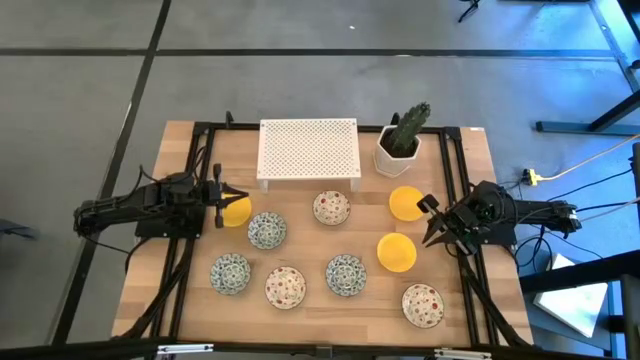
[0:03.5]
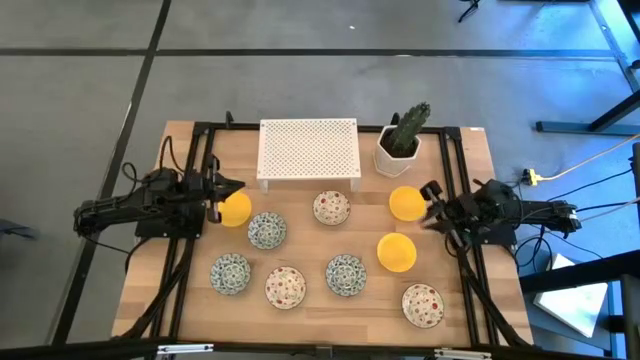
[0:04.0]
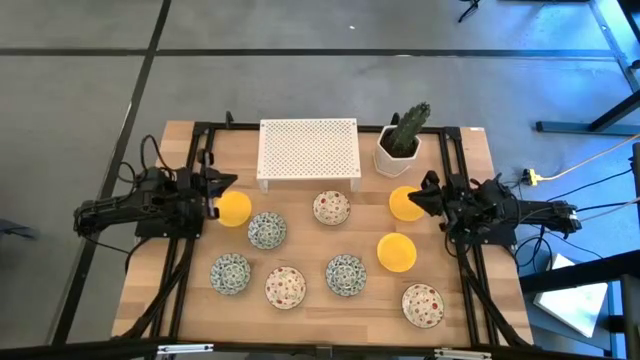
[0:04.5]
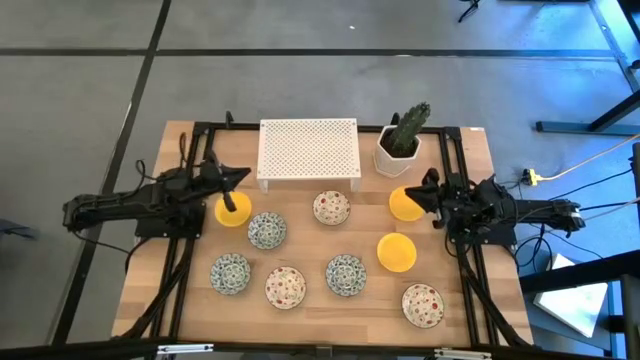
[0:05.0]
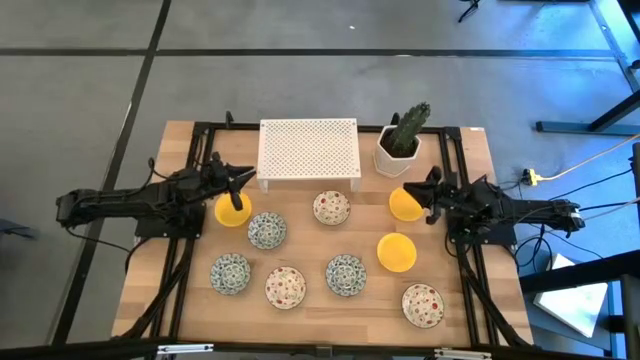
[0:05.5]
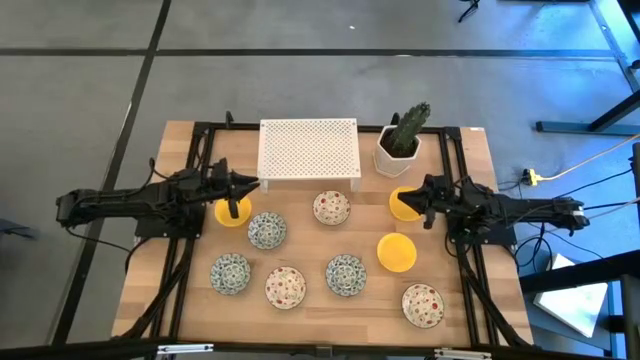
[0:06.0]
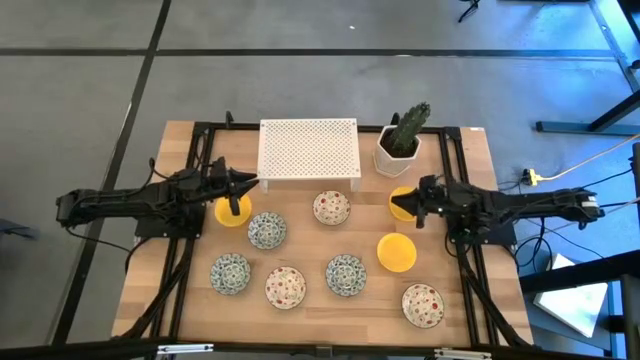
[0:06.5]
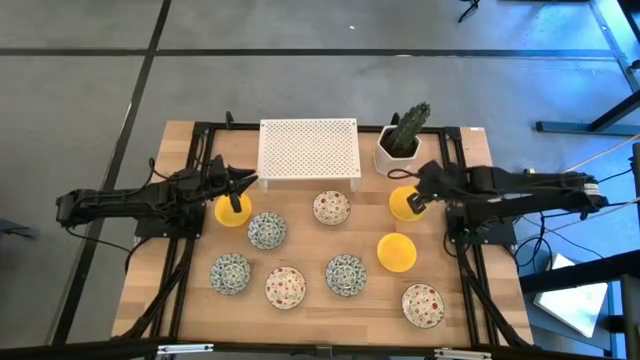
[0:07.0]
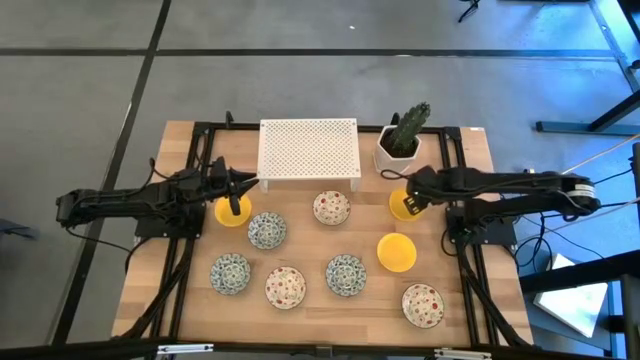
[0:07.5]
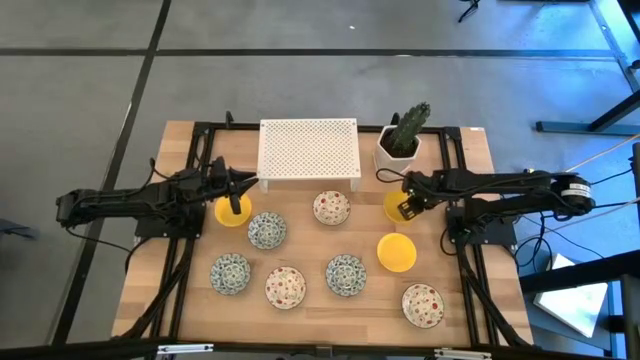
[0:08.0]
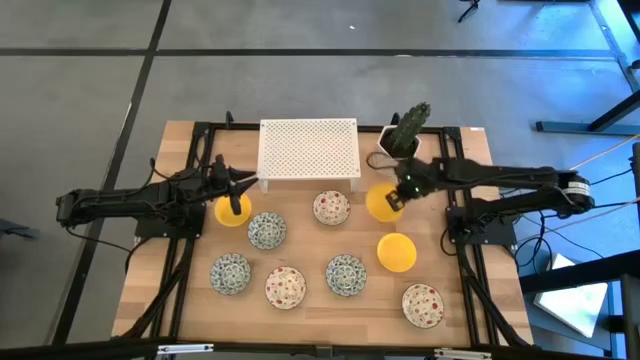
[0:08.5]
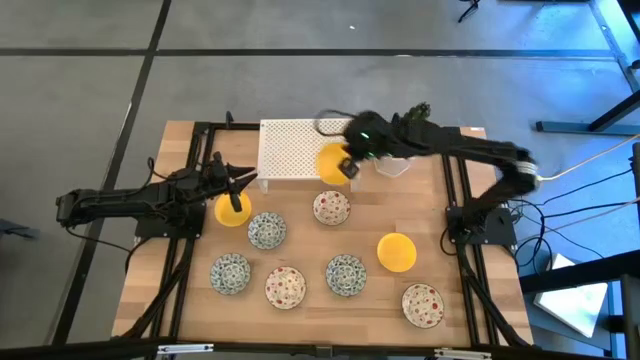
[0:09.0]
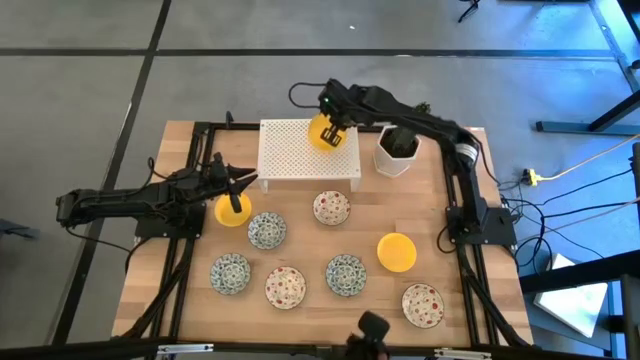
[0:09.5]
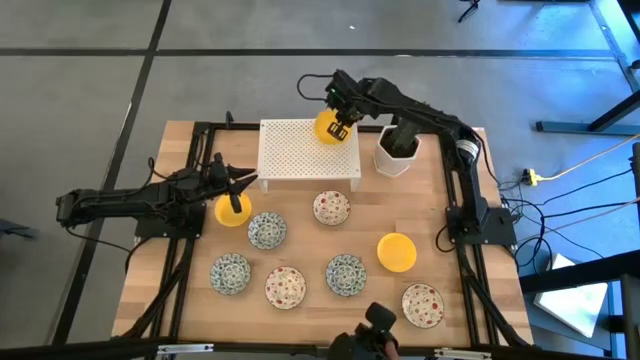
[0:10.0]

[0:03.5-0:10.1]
Task: Pick & Place Mini bowls
Put the top right yellow bowl on the shelf

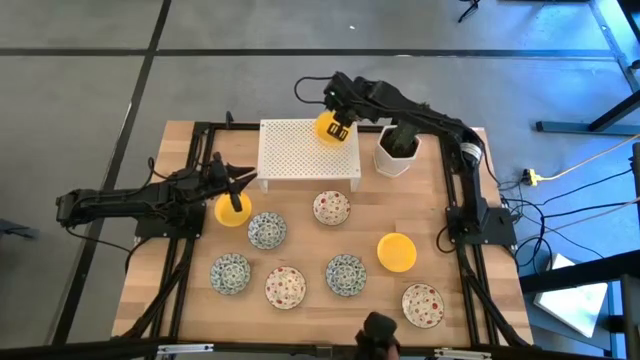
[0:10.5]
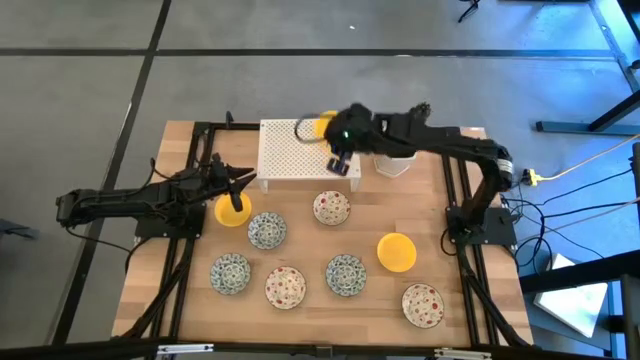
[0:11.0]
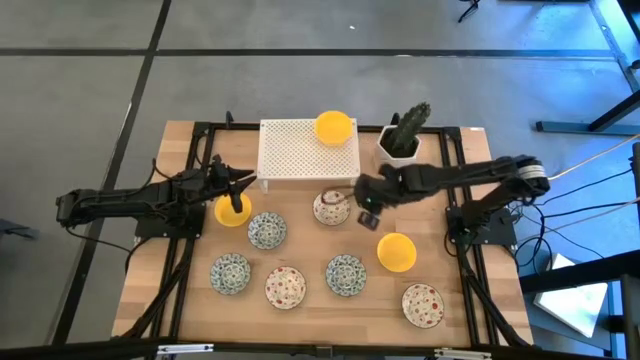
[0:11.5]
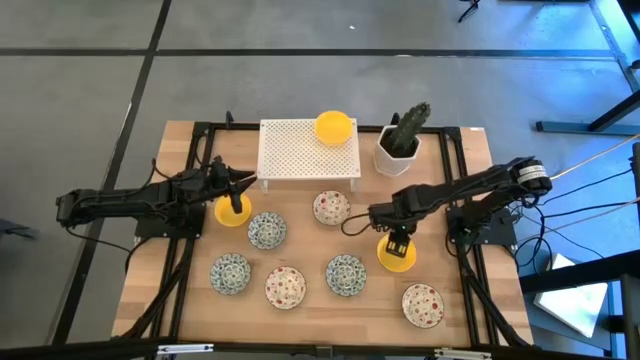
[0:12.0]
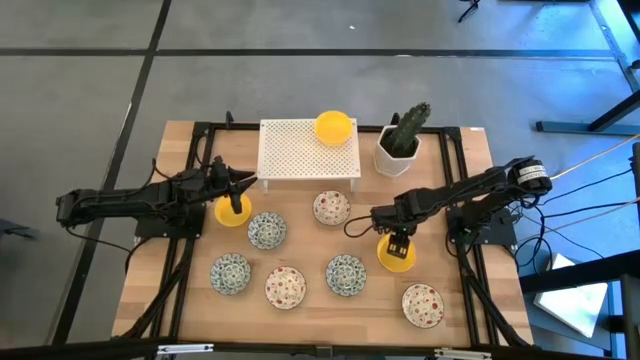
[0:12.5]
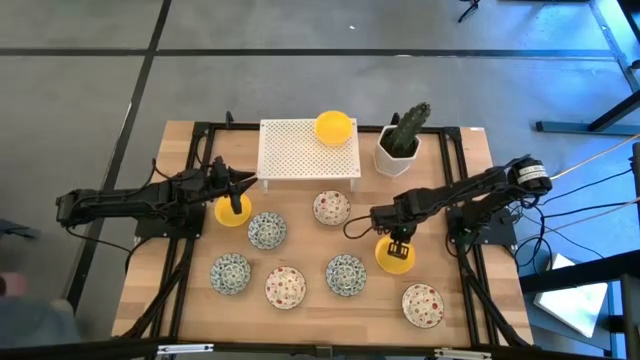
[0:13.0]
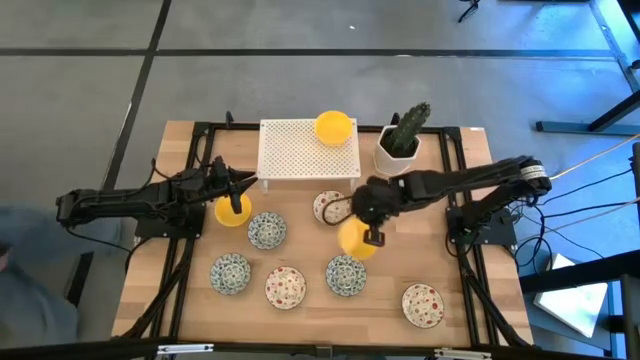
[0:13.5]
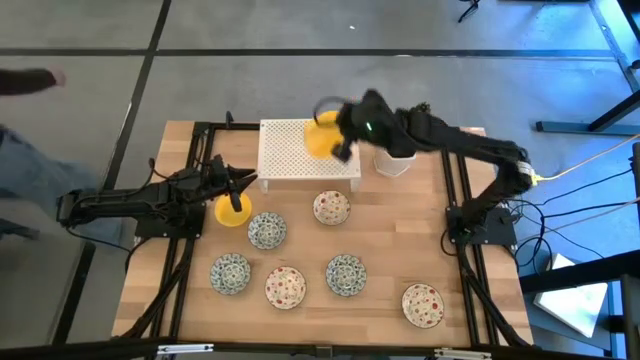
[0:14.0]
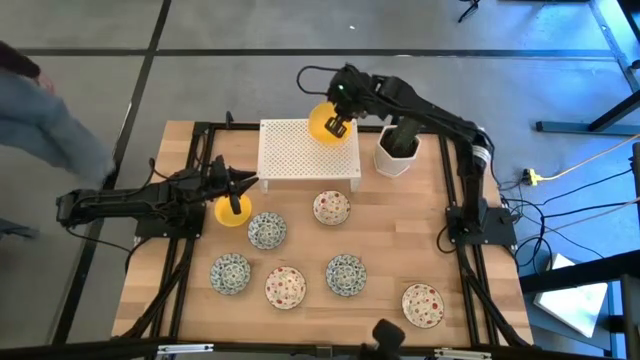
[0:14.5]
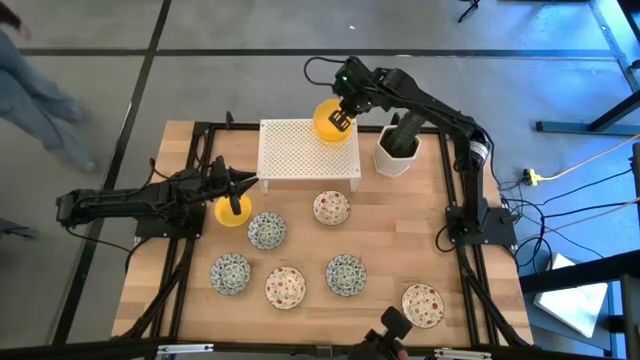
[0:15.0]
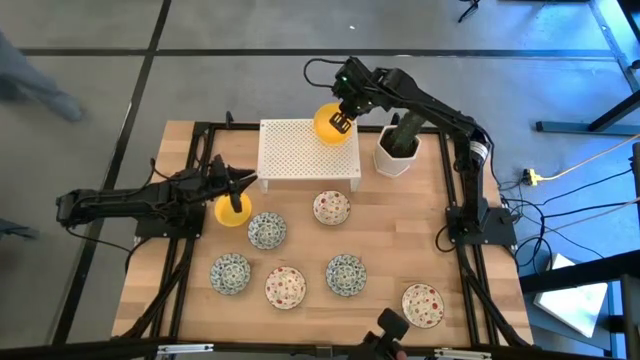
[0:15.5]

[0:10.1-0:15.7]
Stack the right yellow bowl on top of the yellow bowl on the shelf

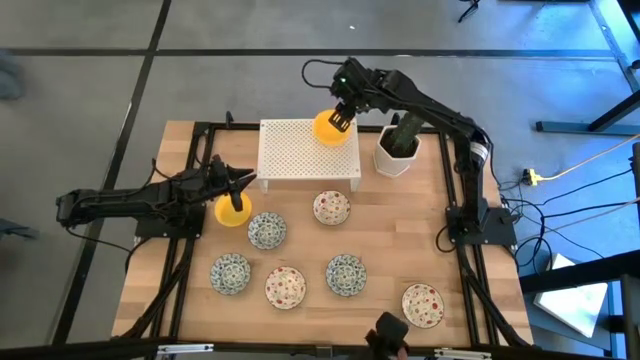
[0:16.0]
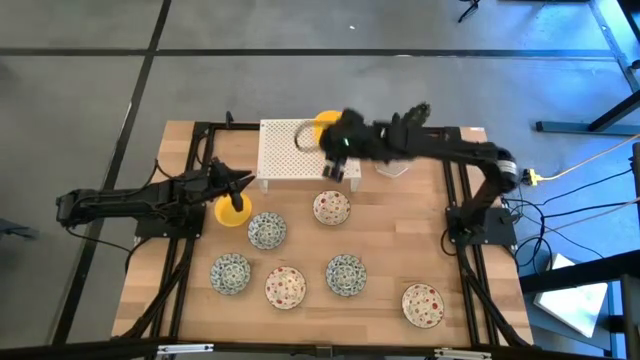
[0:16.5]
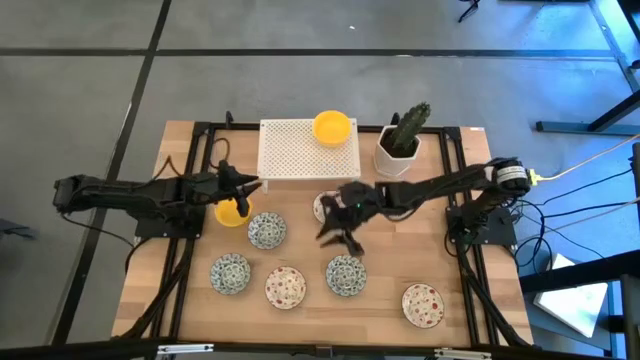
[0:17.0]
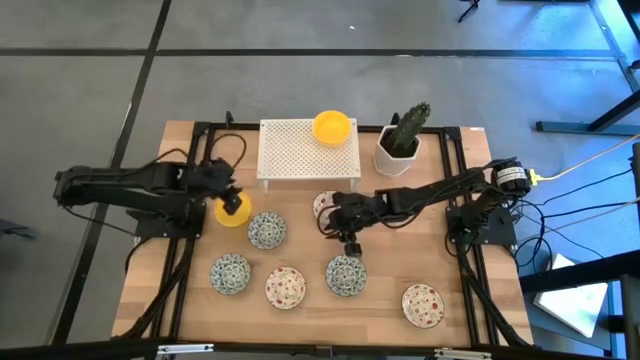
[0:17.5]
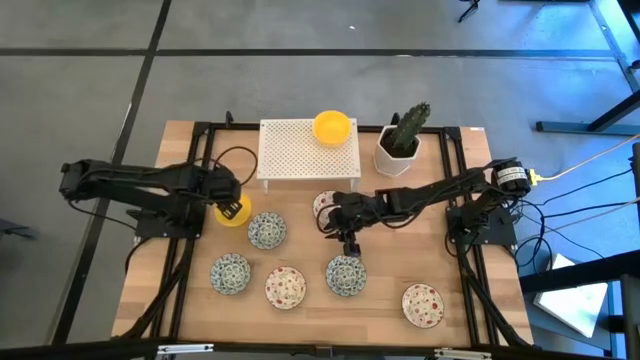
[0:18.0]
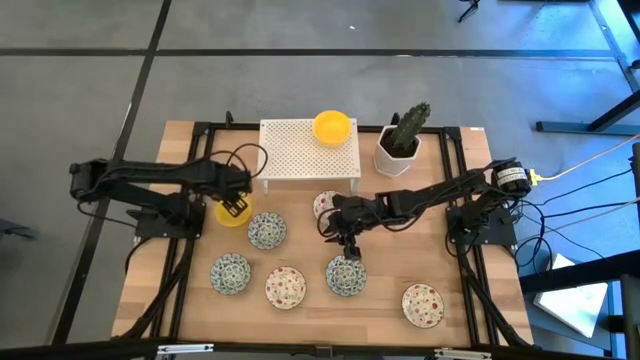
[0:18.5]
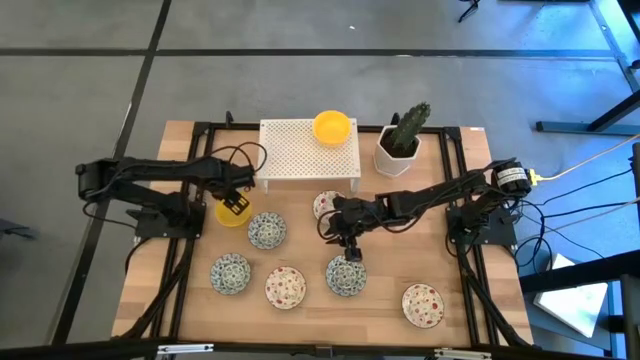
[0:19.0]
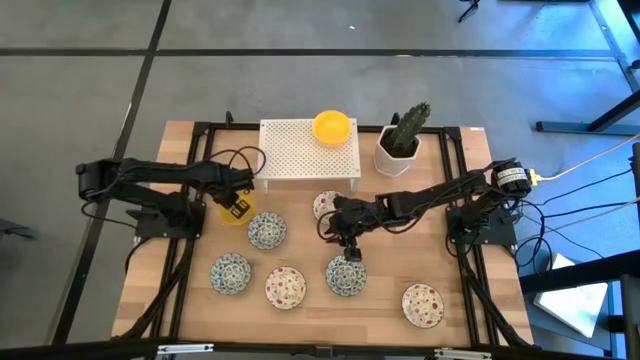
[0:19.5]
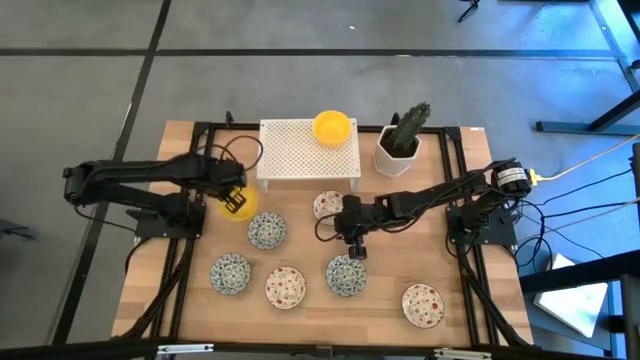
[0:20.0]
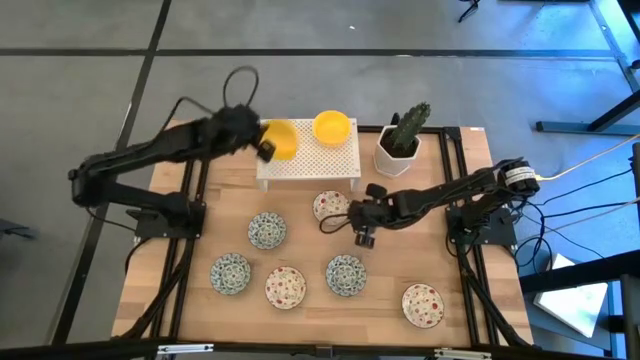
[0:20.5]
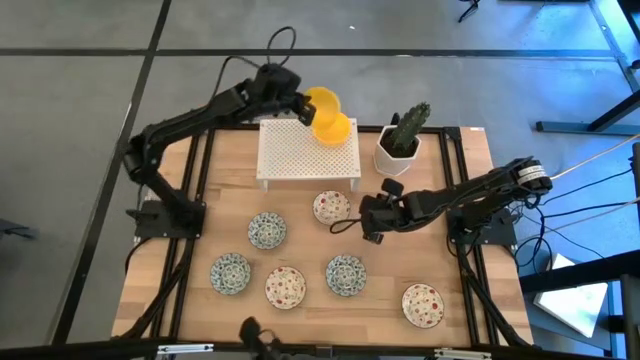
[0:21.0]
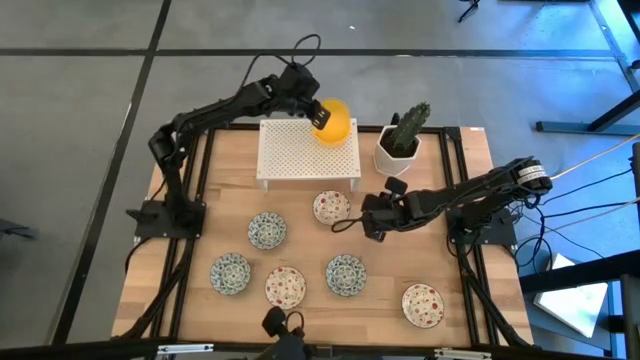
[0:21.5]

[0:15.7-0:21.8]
Stack the yellow bowl on top of the yellow bowl on the shelf

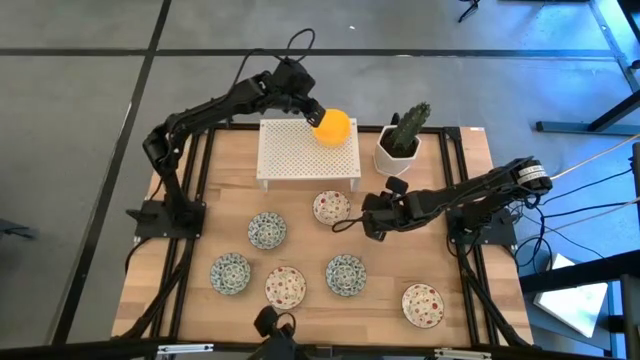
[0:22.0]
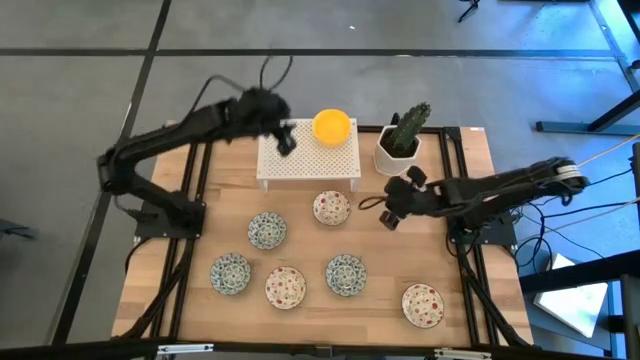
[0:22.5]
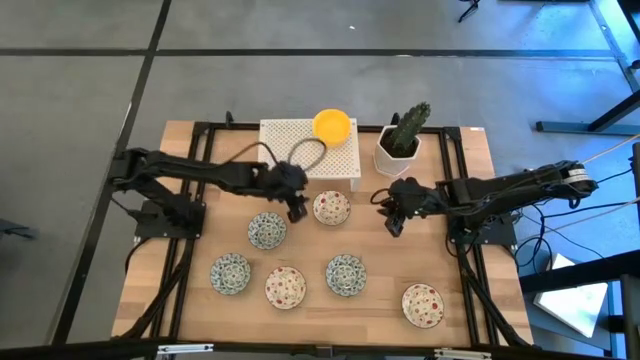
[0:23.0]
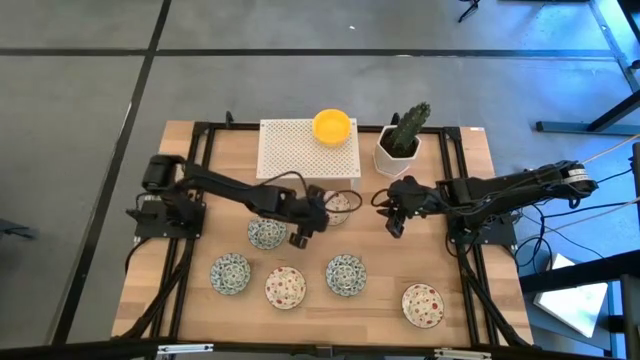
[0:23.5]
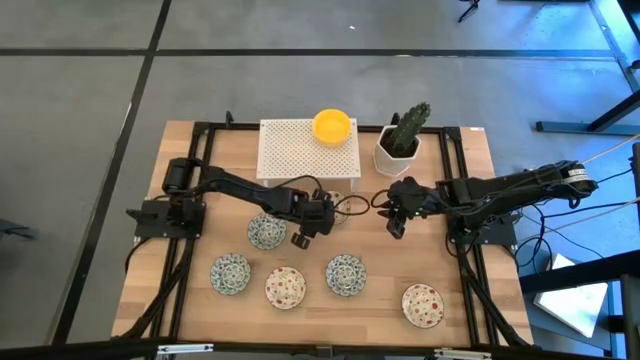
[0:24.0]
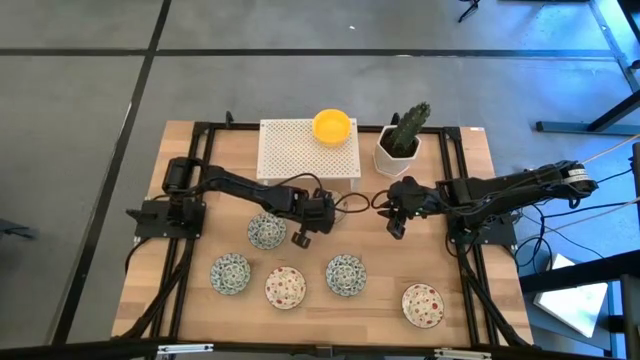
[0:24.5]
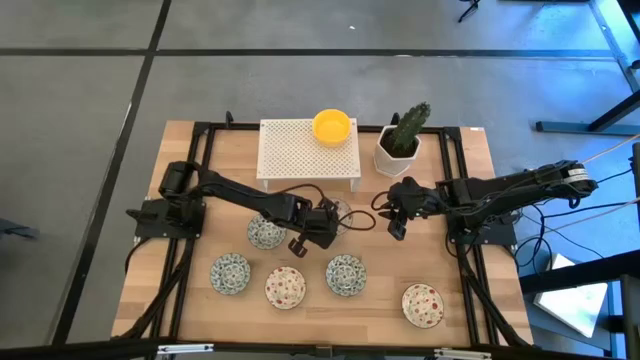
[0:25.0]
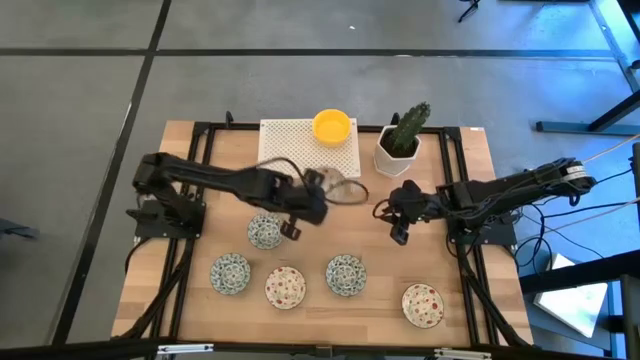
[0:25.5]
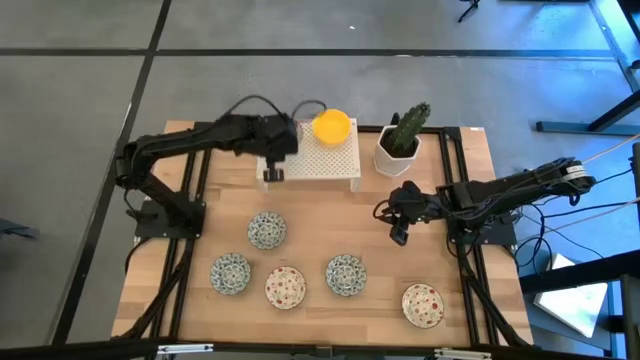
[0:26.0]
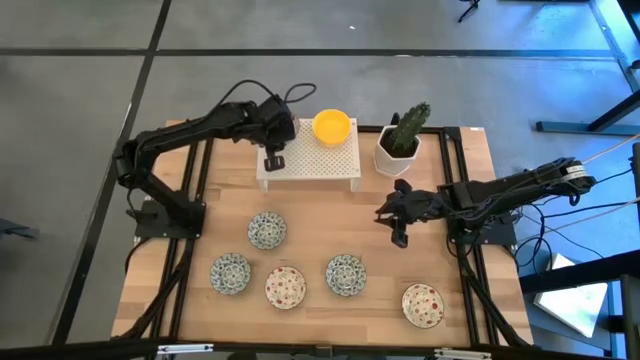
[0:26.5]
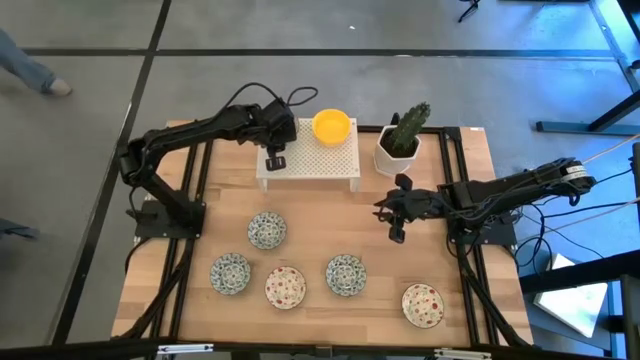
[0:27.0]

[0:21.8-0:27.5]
Put the top green patterned bowl on the shelf
